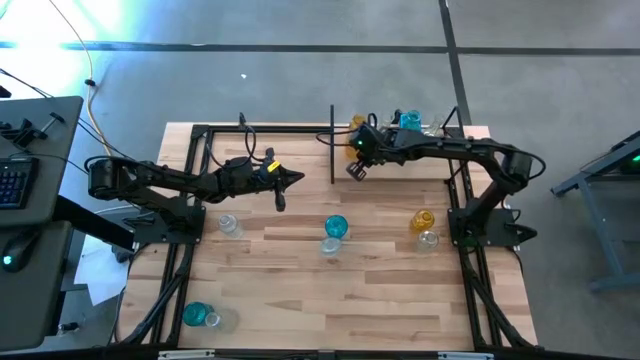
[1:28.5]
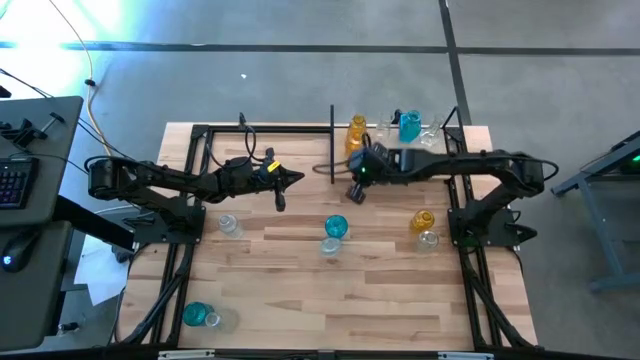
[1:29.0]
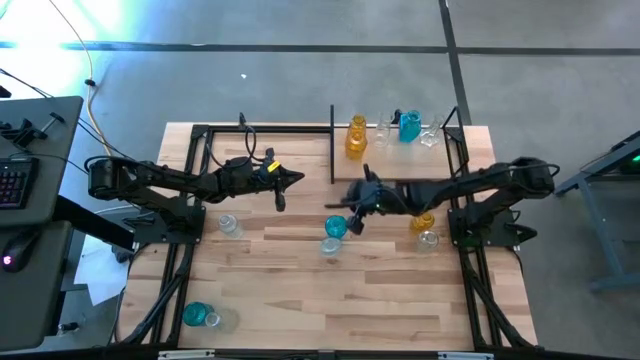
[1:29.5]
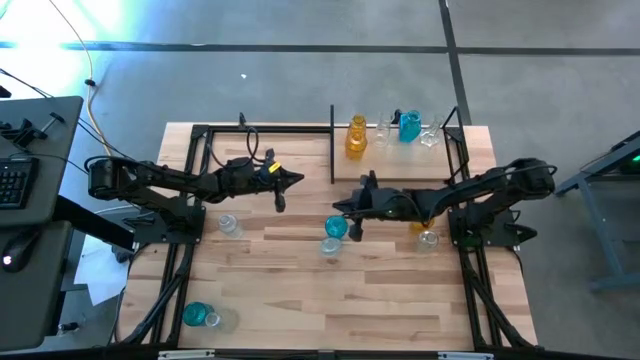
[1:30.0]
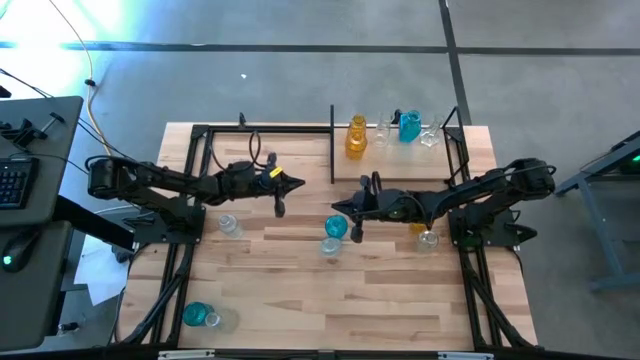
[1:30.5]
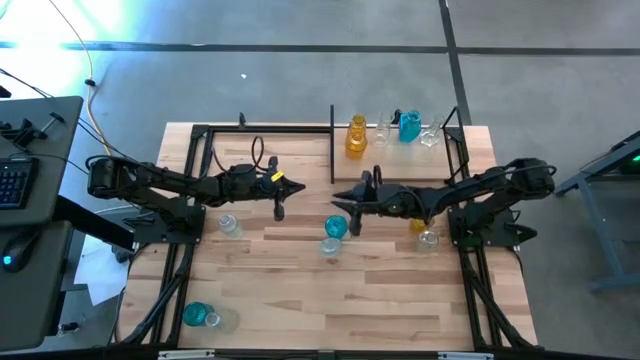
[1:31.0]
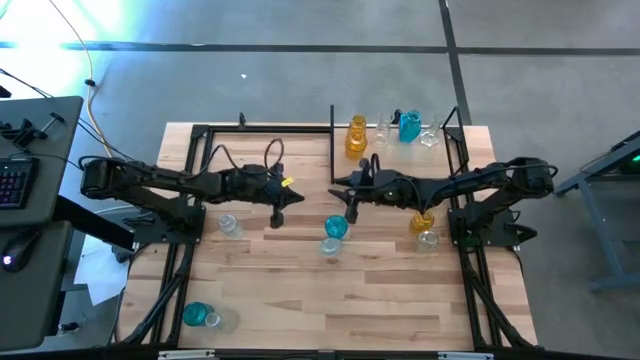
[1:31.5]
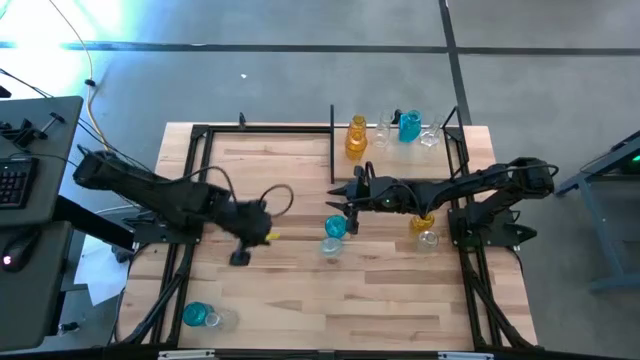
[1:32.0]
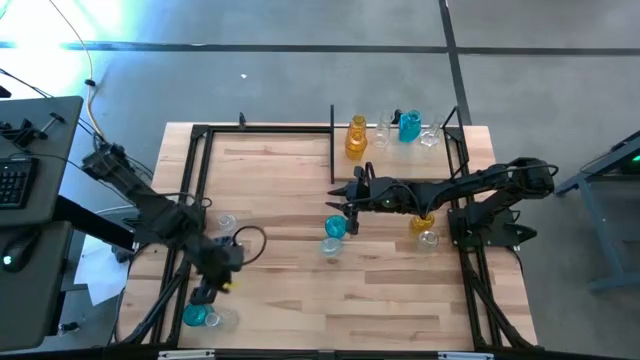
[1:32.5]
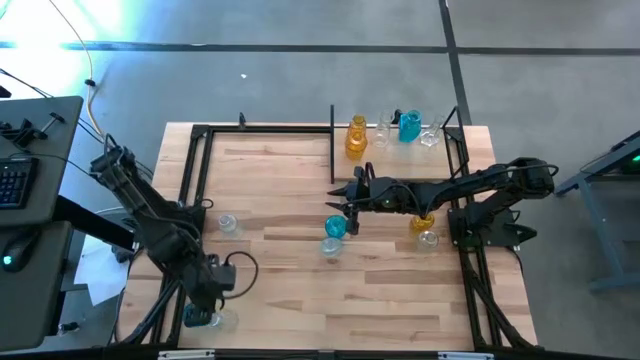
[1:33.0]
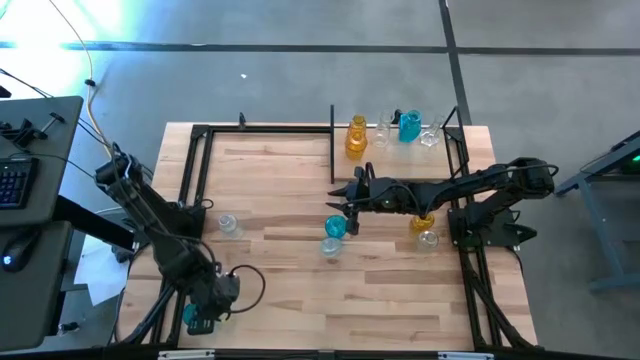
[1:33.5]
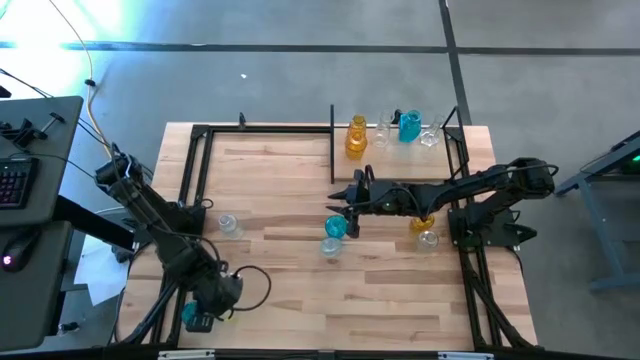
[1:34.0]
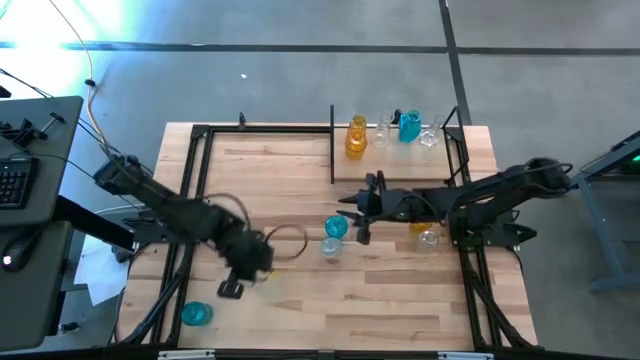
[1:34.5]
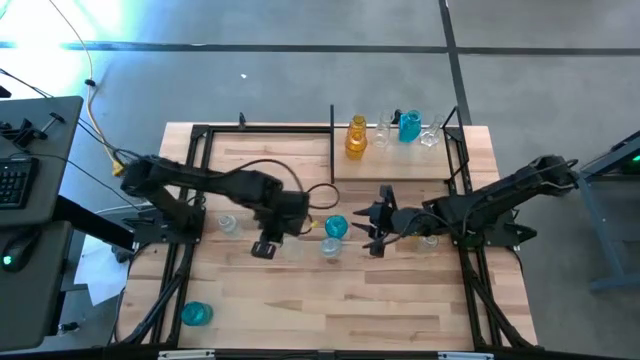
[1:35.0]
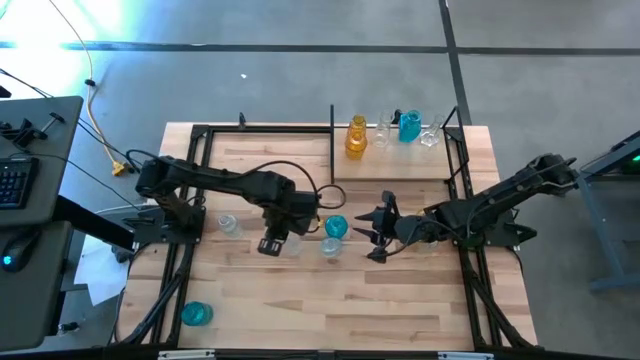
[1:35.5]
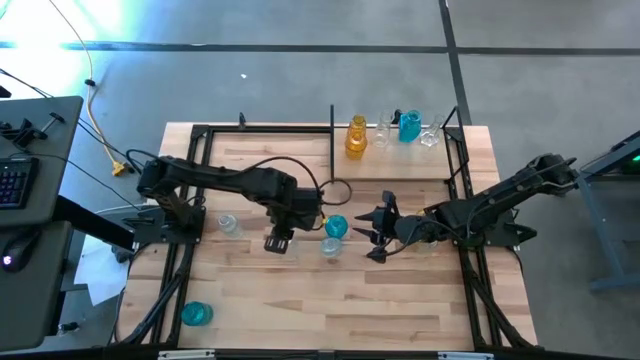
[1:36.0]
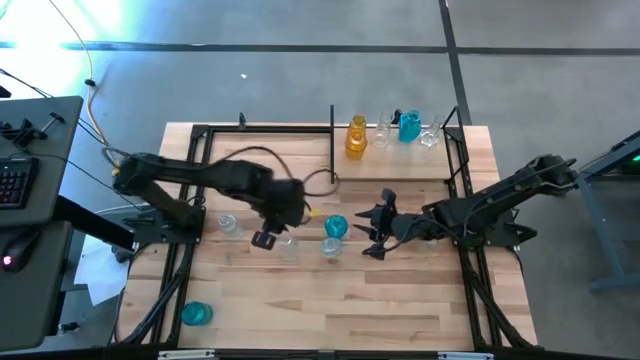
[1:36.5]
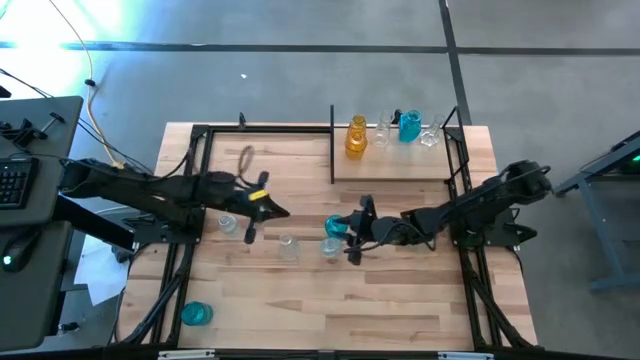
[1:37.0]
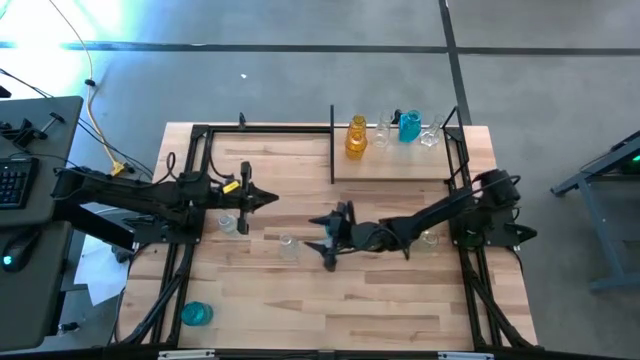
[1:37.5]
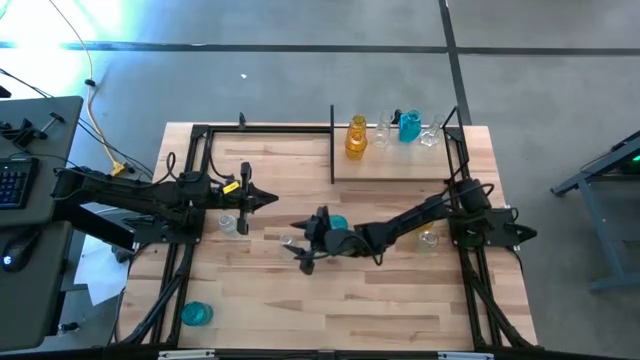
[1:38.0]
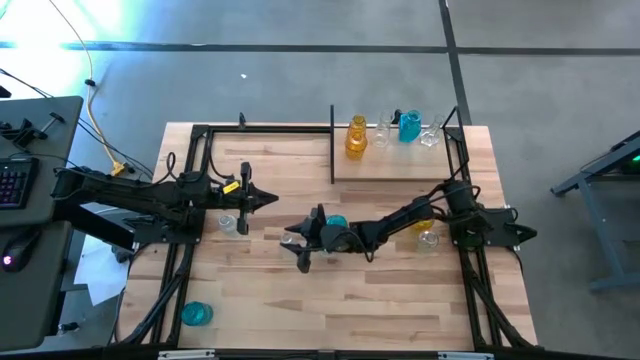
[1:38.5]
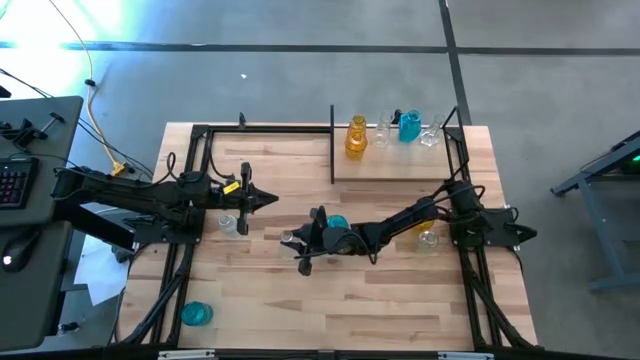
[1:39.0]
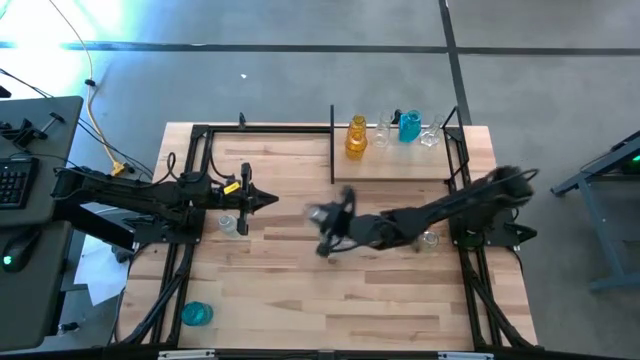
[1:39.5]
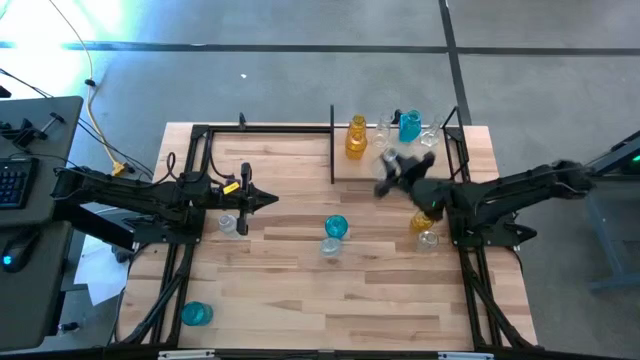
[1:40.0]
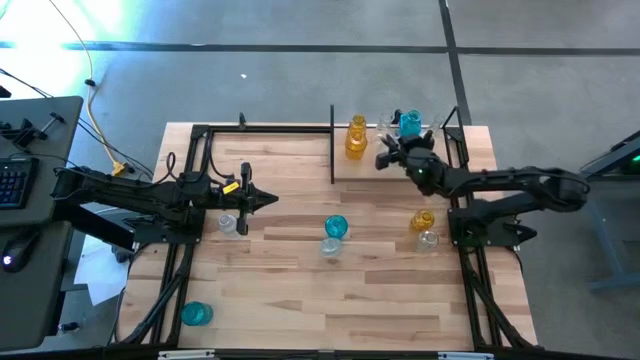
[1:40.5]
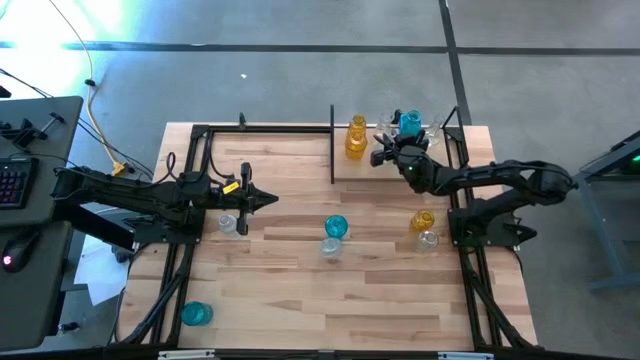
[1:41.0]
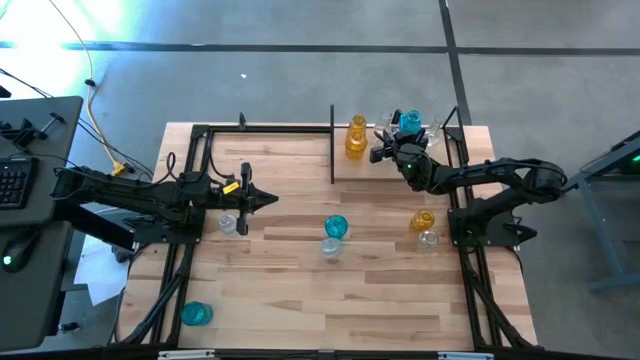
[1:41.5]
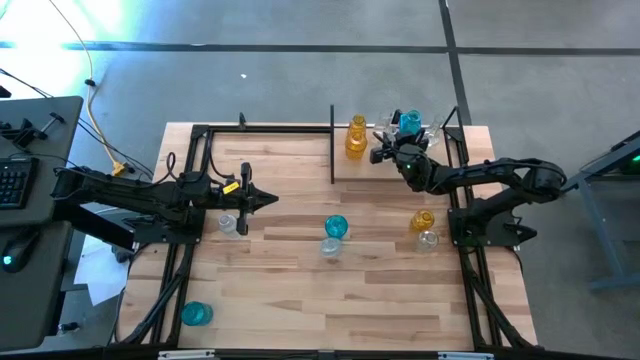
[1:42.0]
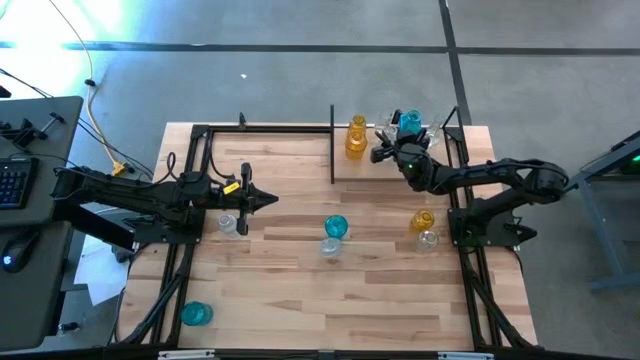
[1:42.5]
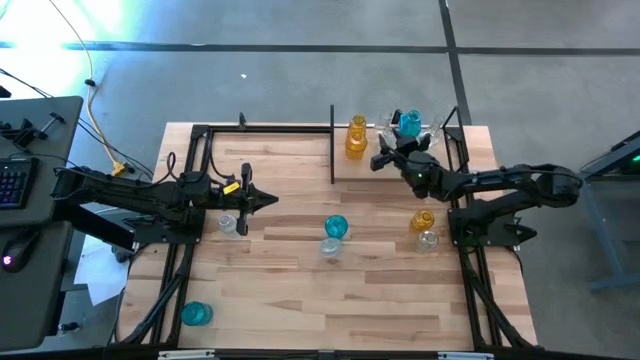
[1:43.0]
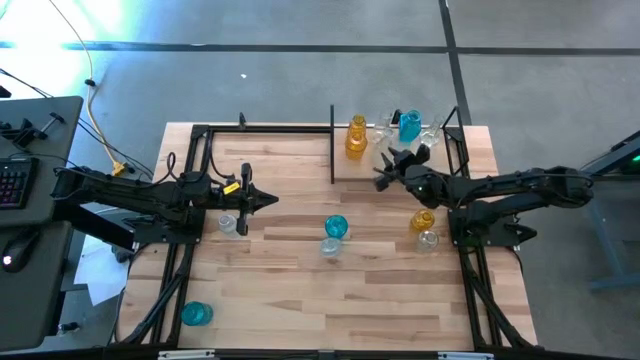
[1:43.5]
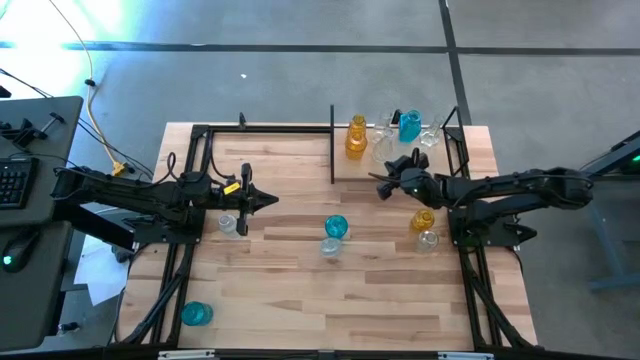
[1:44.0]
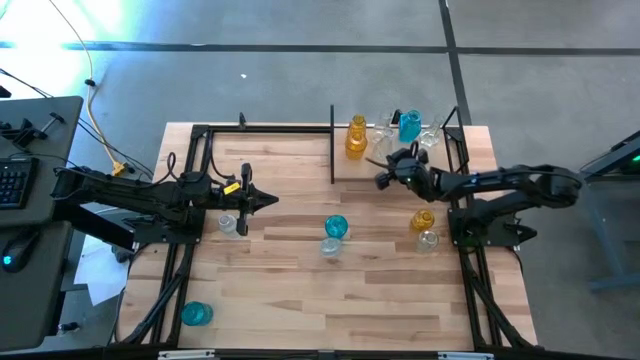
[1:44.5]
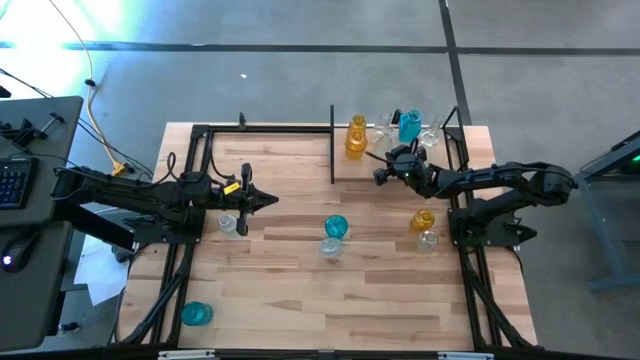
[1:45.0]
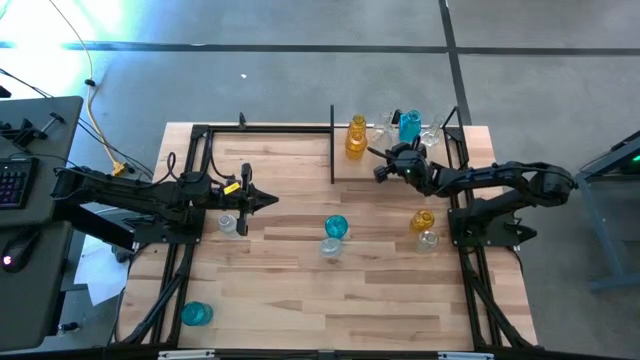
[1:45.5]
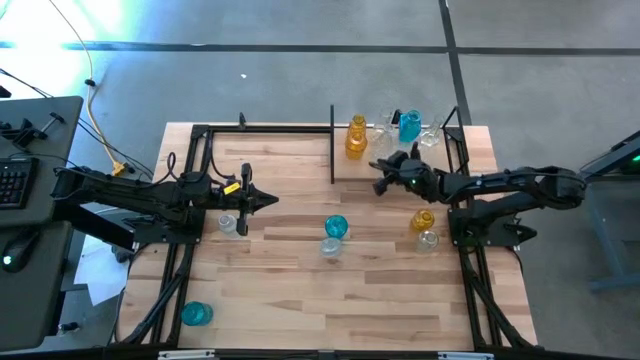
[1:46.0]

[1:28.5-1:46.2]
Task: sort vases onto shelf
Put the transparent vase on the shelf aligned with the other transparent vase
